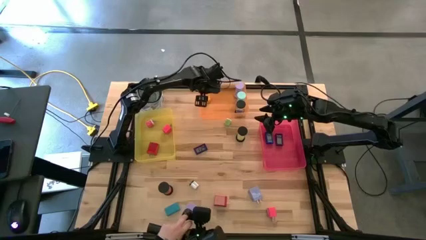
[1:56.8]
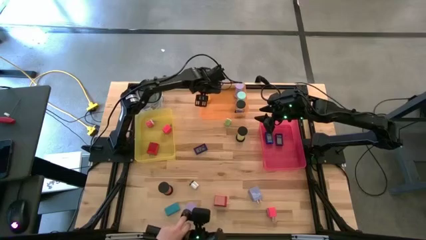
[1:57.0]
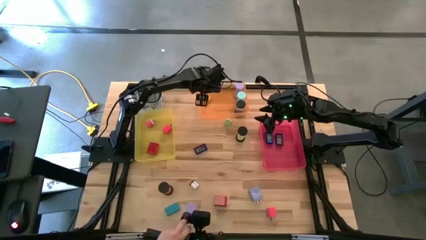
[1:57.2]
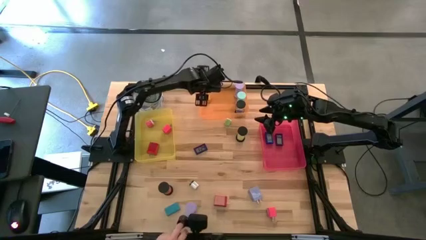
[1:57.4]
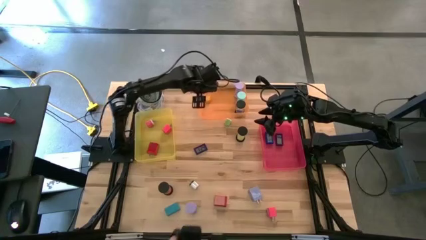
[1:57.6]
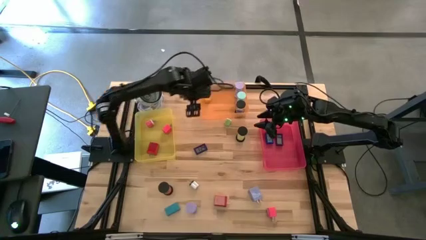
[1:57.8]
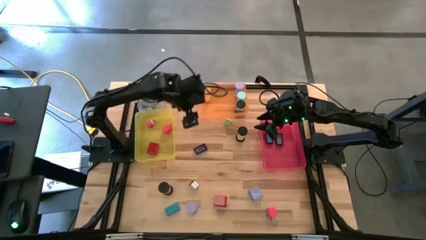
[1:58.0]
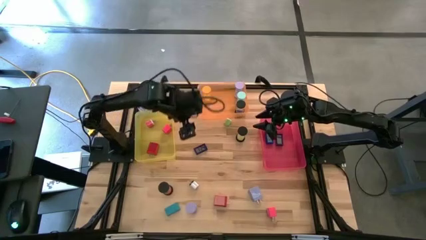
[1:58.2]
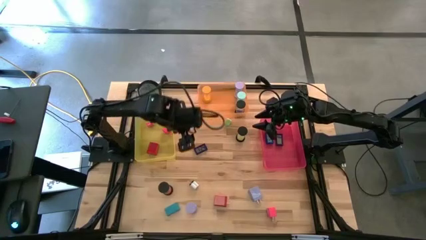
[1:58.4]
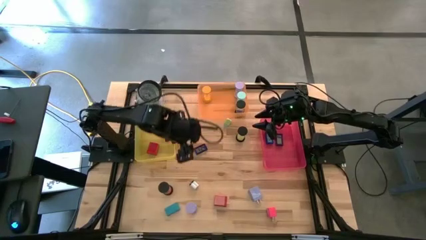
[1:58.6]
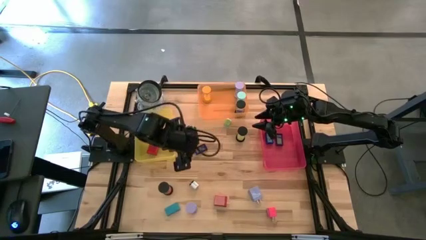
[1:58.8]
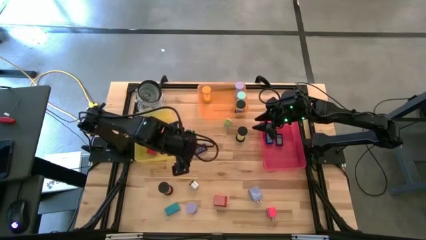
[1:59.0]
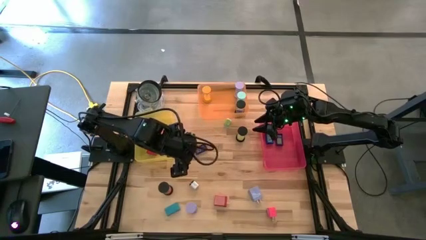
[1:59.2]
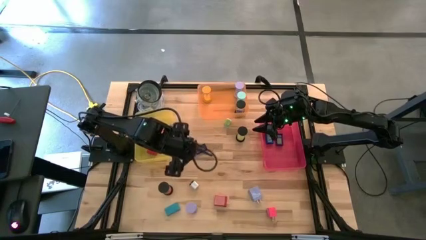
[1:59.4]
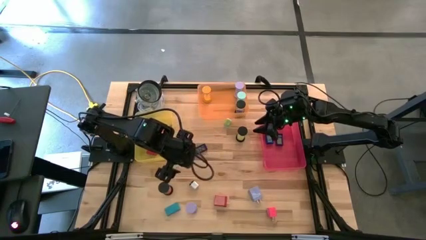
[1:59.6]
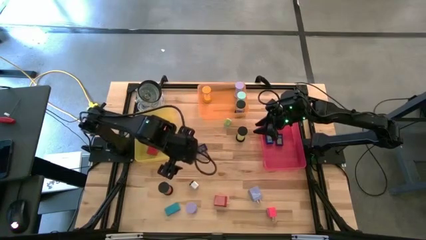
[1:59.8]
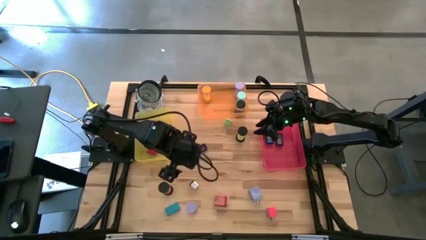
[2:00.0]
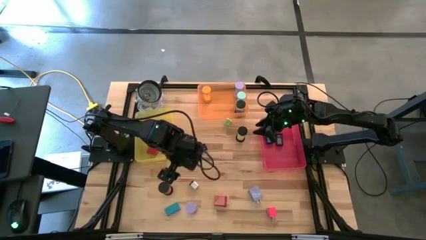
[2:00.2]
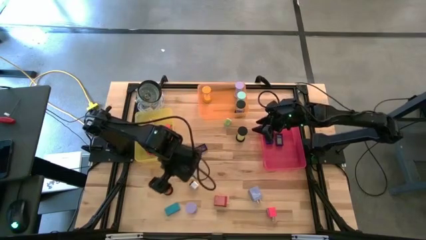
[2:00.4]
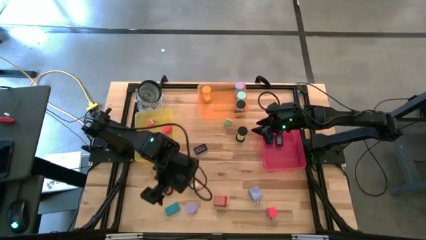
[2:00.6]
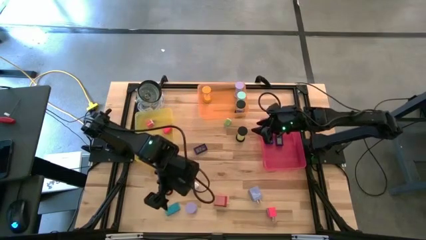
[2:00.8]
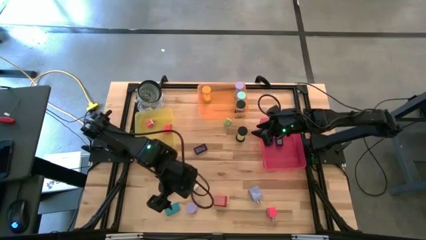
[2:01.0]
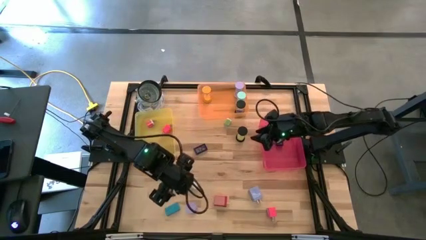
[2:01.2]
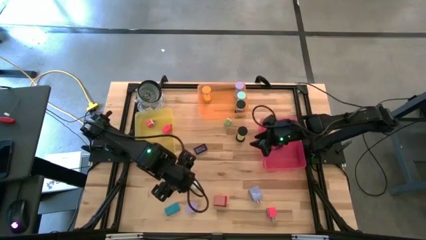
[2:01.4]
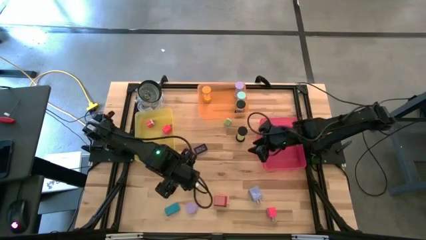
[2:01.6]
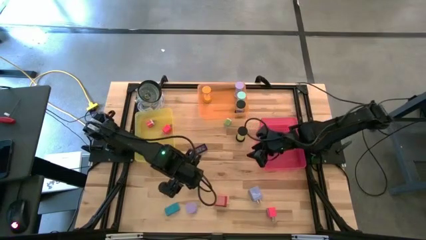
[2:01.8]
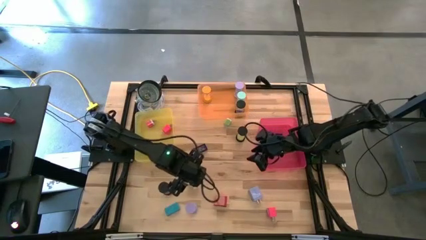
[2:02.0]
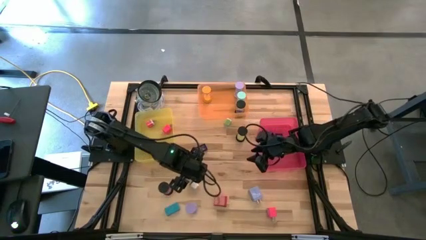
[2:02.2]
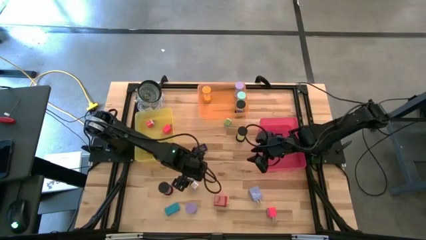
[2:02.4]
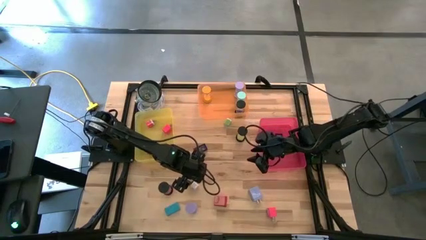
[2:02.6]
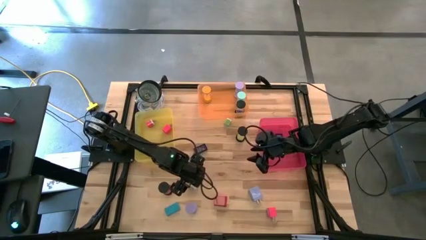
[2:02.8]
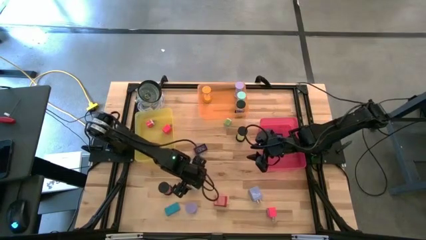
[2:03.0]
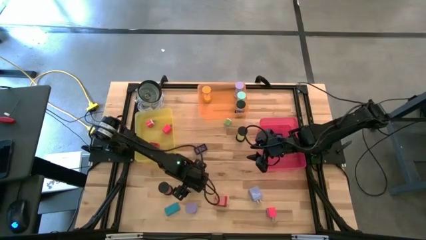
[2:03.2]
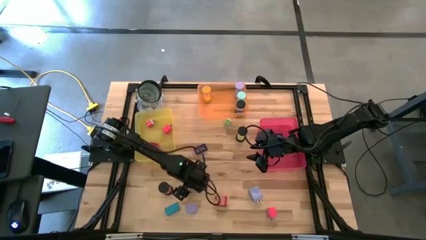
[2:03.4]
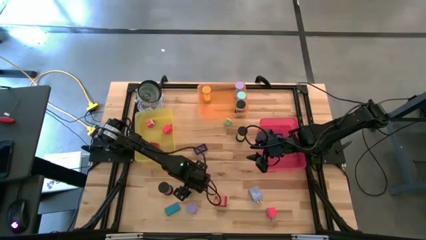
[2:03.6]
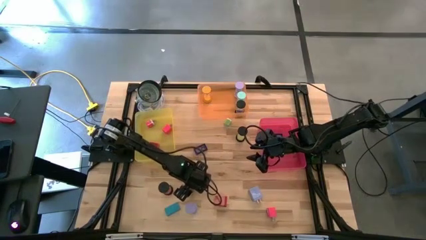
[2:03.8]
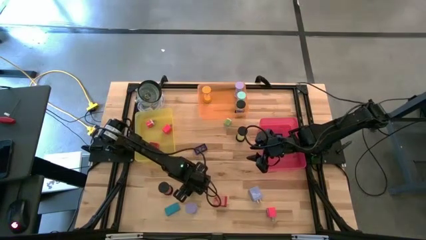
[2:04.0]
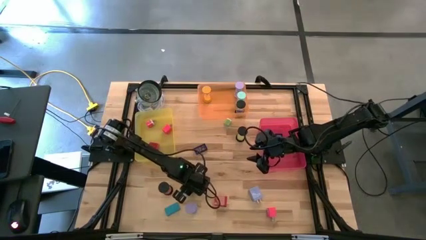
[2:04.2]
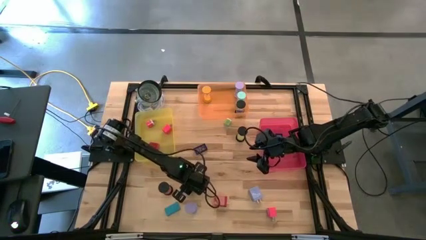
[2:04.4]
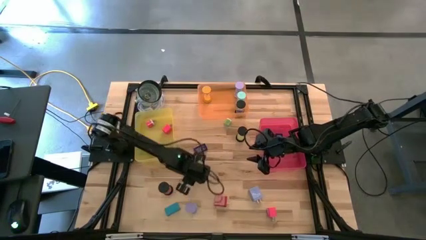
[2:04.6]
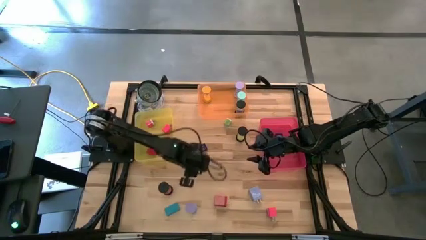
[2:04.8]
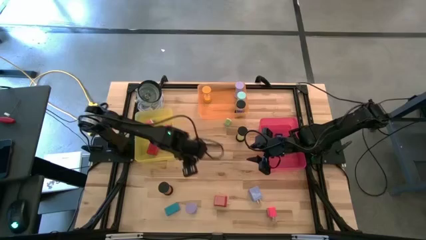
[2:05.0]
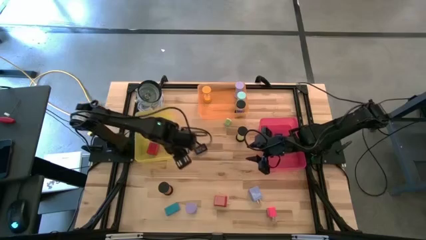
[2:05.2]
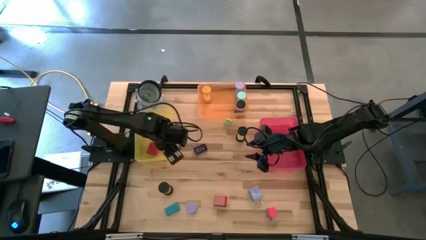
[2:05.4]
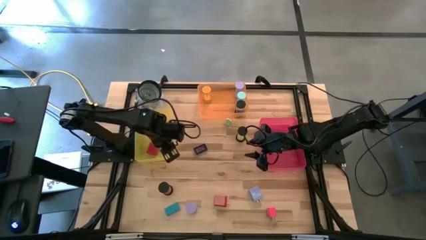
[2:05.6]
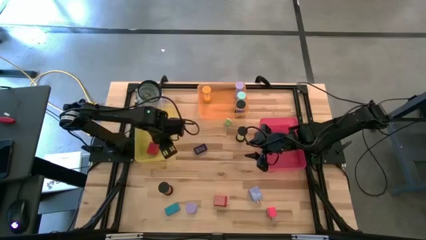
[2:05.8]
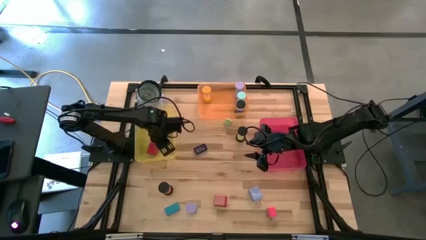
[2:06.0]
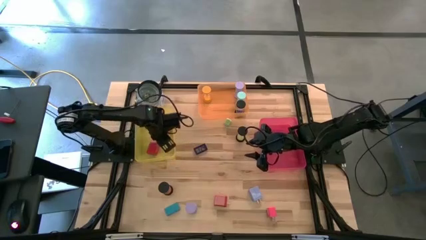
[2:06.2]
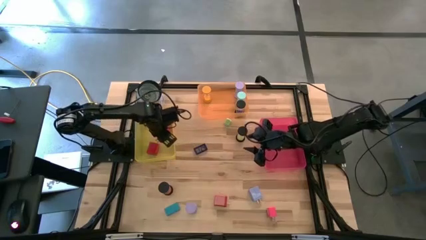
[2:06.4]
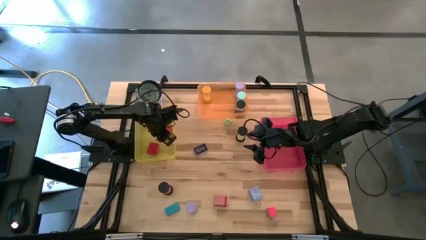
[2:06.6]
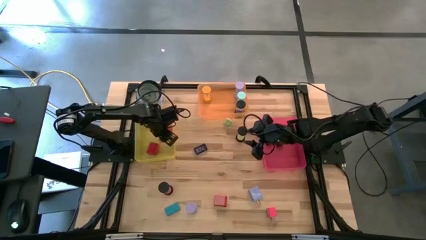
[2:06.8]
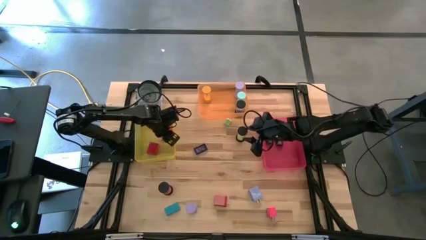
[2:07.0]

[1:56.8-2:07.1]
Task: Pick & Place Office items
Put the white charger in the orange bin

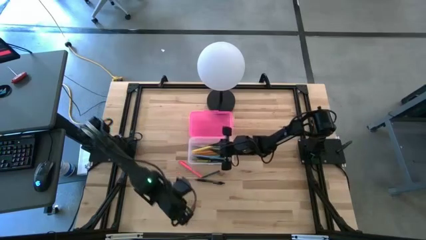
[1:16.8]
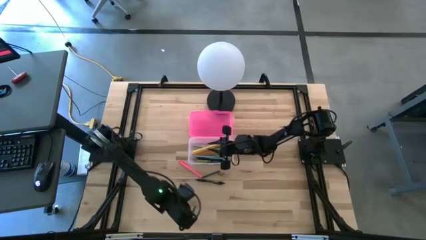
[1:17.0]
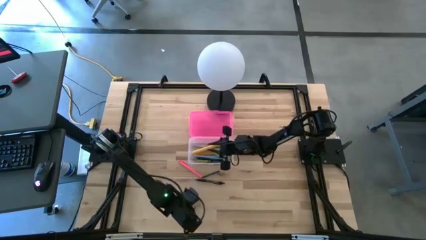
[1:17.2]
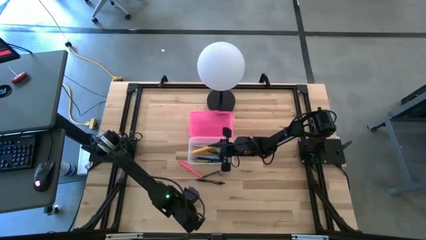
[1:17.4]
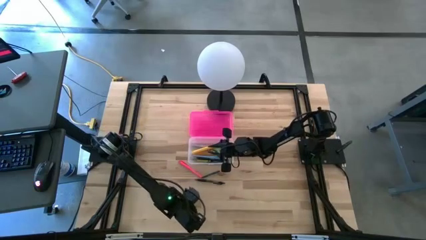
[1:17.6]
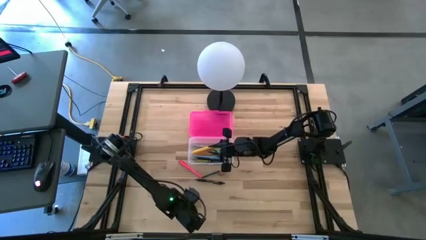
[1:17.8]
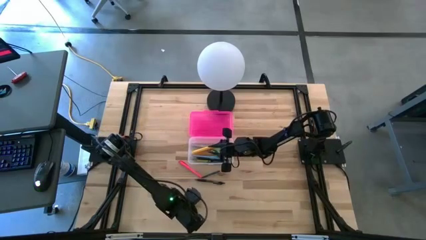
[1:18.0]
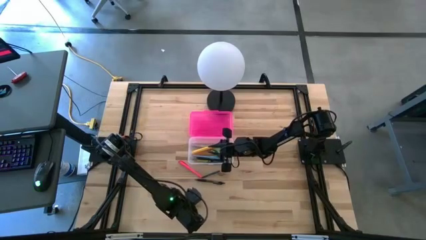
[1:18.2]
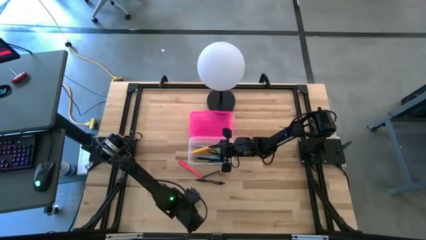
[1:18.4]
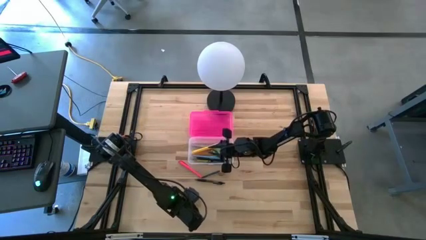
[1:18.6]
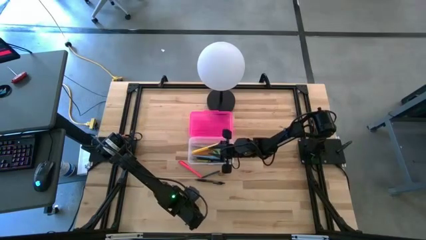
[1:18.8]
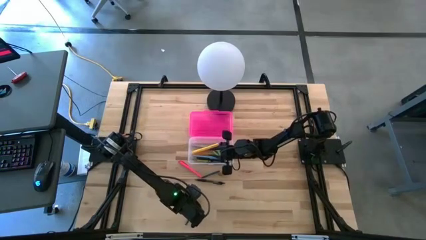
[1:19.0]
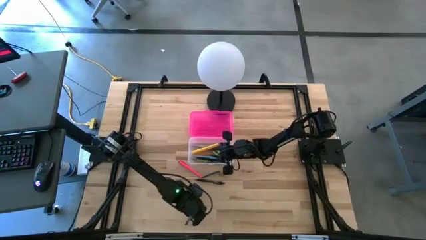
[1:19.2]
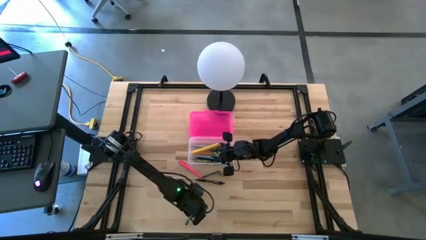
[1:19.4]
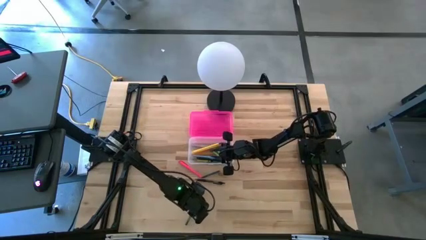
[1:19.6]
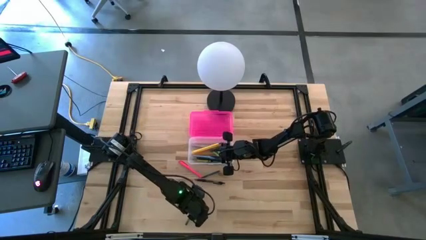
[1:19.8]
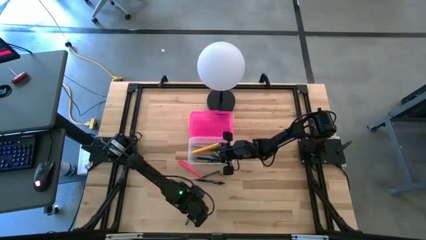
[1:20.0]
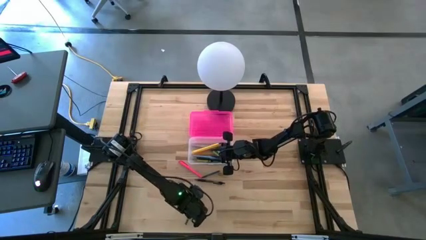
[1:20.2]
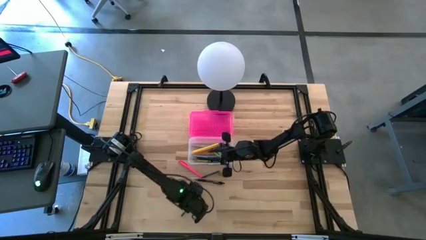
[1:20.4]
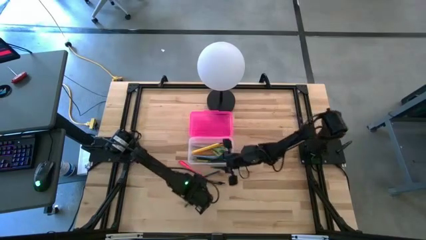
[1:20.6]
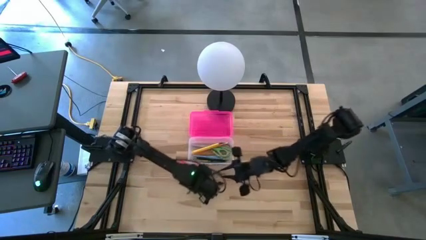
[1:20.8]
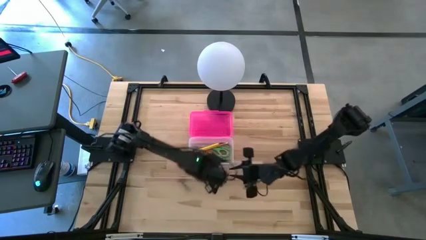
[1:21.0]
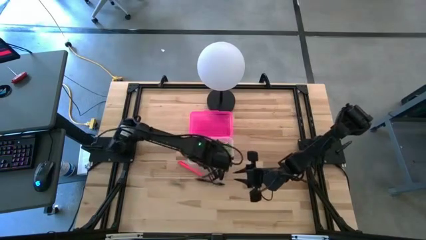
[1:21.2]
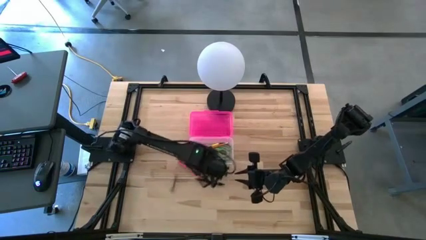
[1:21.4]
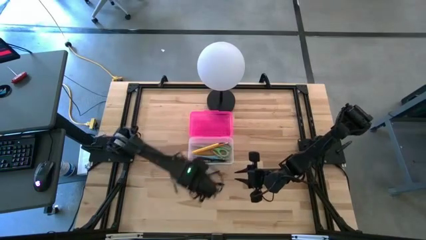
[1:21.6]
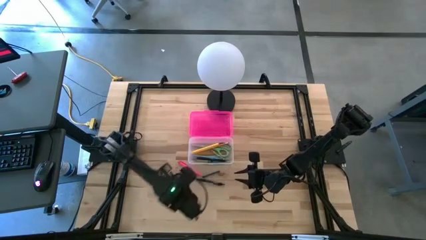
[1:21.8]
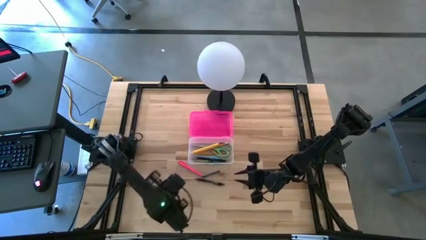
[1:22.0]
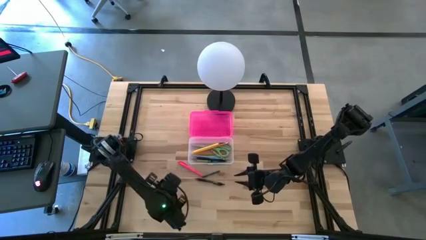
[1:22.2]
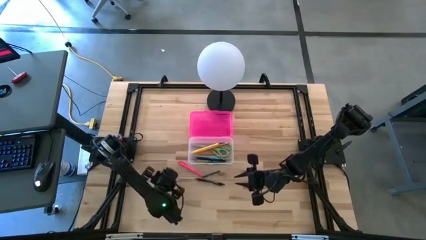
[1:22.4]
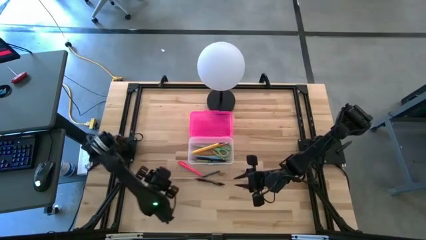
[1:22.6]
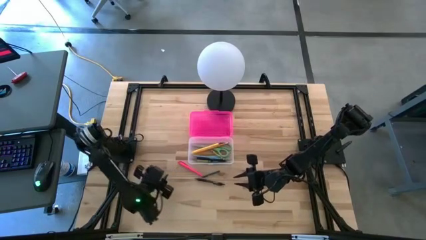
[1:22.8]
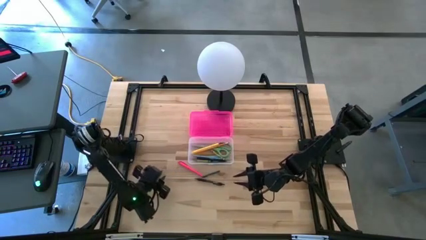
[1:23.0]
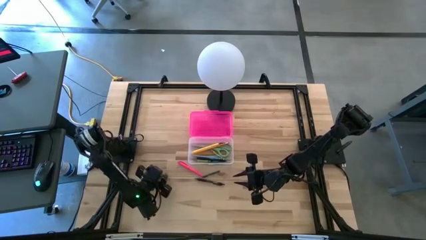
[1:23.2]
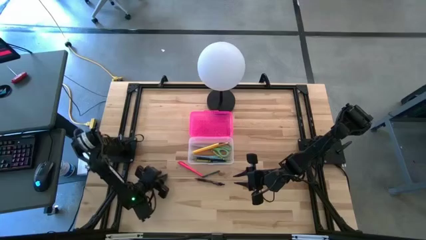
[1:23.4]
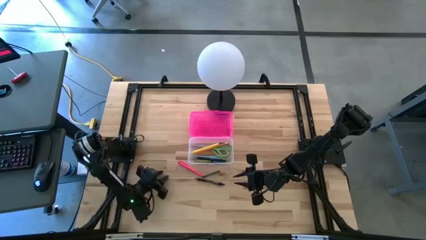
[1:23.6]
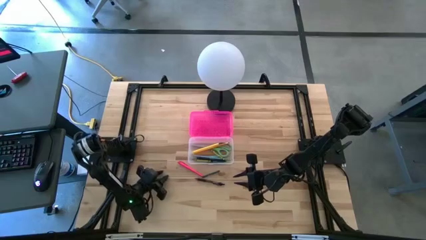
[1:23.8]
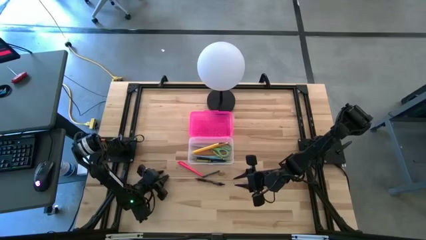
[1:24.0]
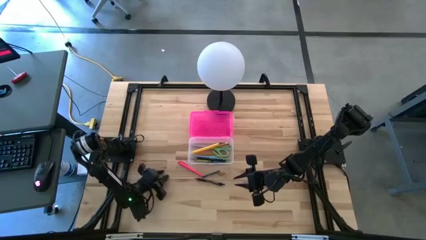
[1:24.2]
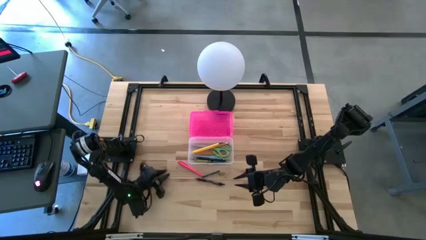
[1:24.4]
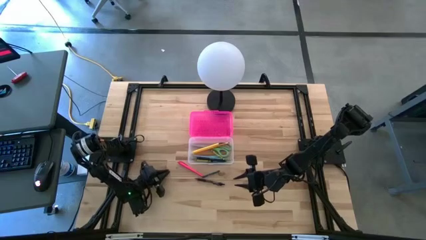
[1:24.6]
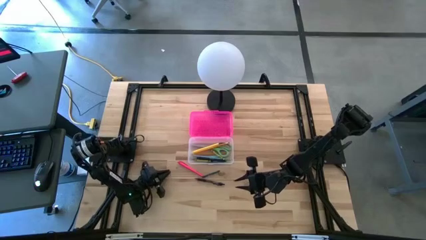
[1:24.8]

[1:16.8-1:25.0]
Task: Pick & place school supplies into a supply box
Put the bottom green crayon into the pink supply box
